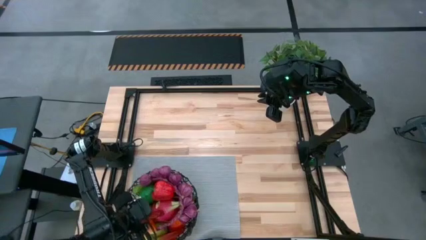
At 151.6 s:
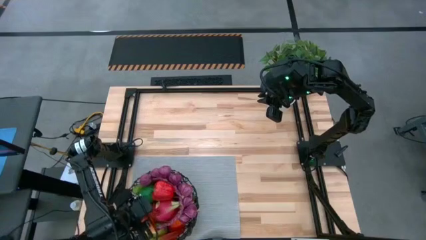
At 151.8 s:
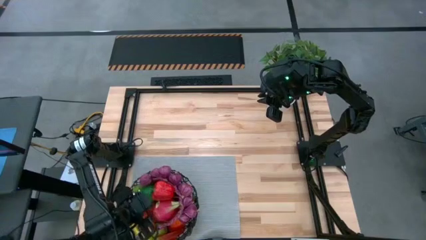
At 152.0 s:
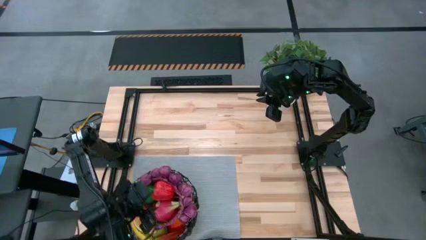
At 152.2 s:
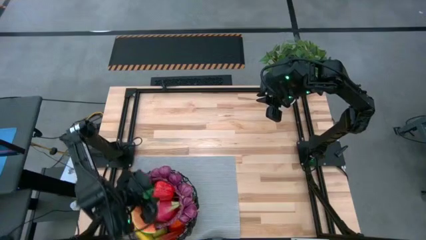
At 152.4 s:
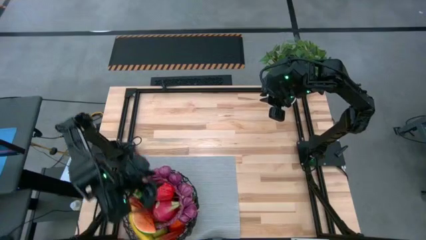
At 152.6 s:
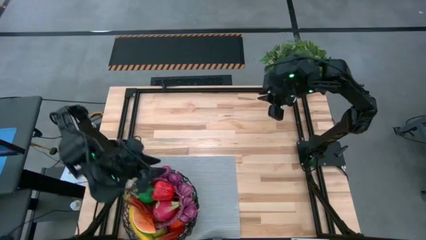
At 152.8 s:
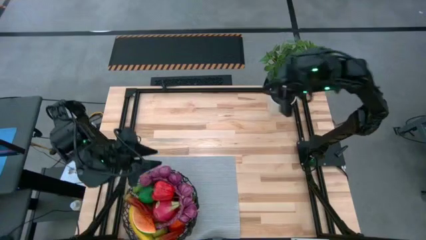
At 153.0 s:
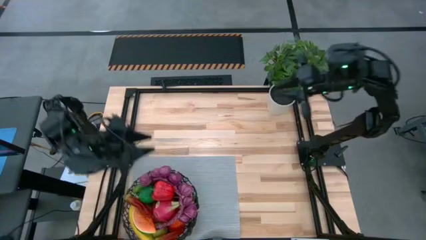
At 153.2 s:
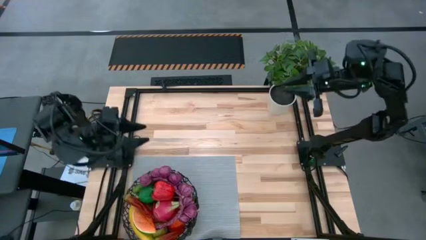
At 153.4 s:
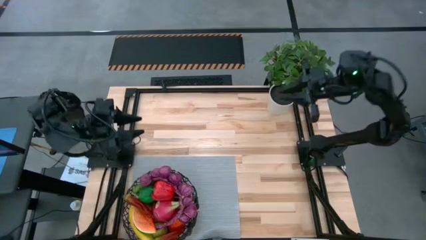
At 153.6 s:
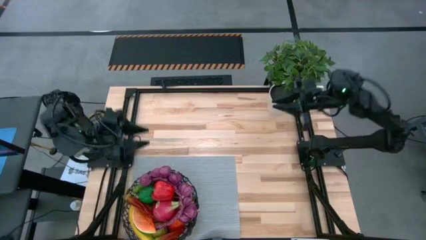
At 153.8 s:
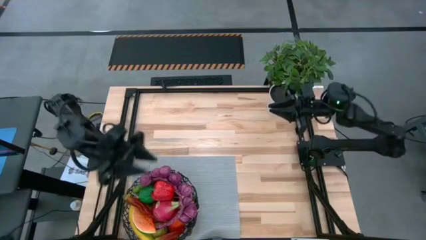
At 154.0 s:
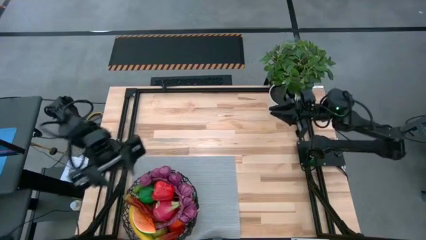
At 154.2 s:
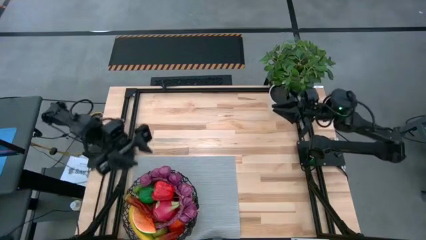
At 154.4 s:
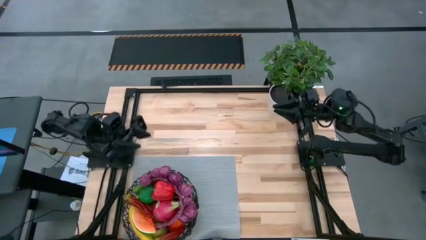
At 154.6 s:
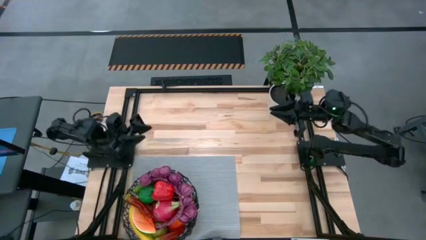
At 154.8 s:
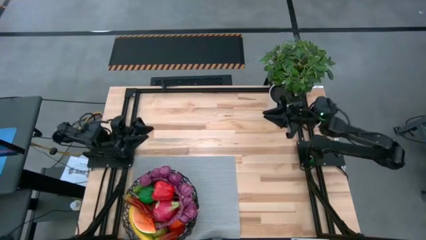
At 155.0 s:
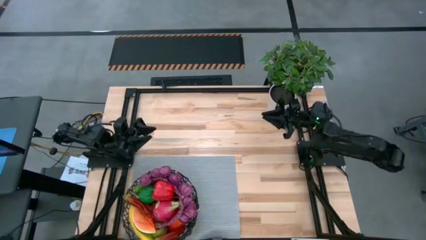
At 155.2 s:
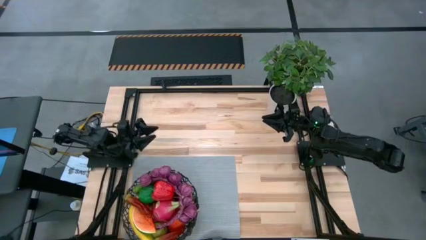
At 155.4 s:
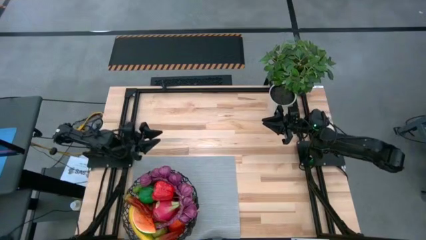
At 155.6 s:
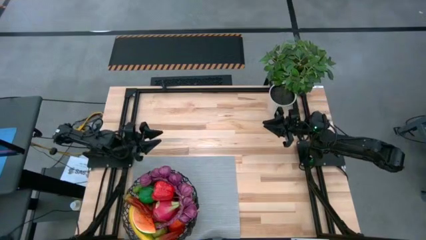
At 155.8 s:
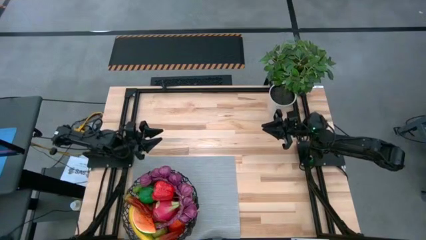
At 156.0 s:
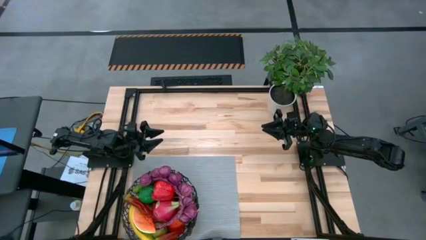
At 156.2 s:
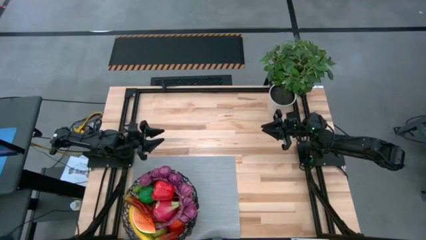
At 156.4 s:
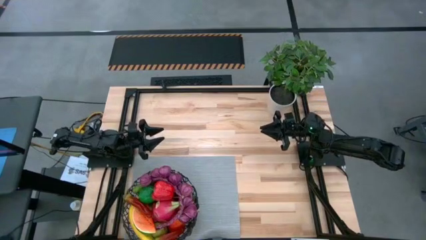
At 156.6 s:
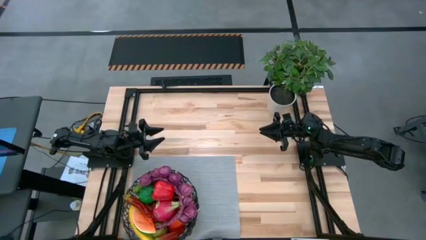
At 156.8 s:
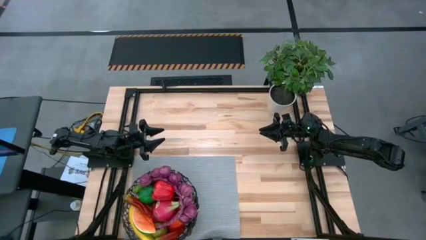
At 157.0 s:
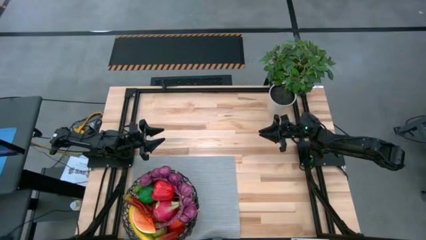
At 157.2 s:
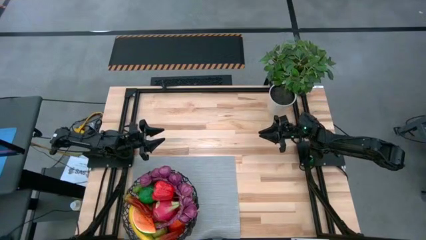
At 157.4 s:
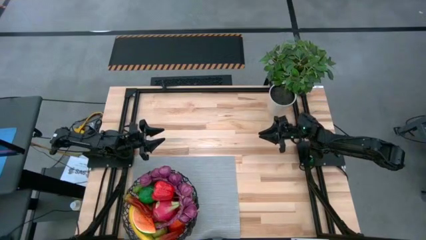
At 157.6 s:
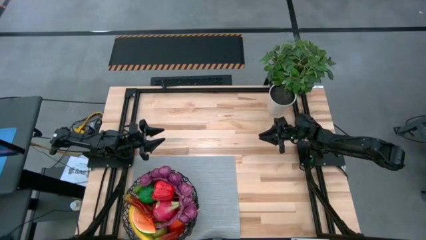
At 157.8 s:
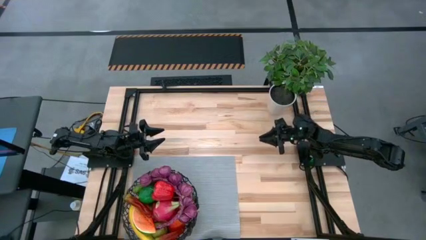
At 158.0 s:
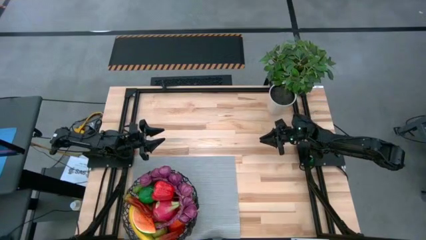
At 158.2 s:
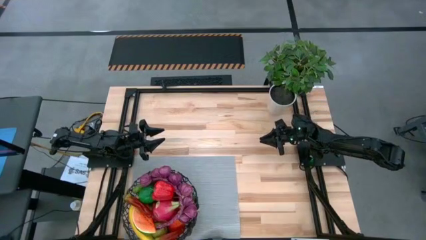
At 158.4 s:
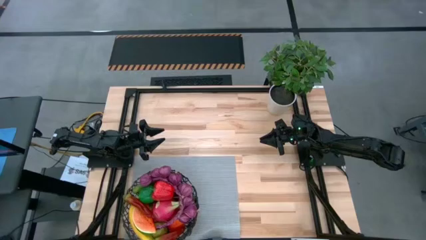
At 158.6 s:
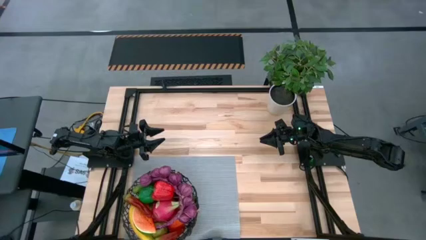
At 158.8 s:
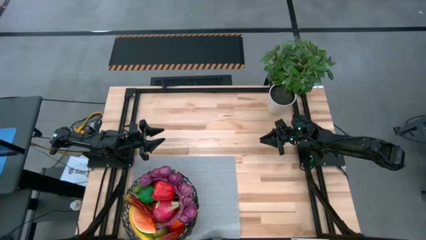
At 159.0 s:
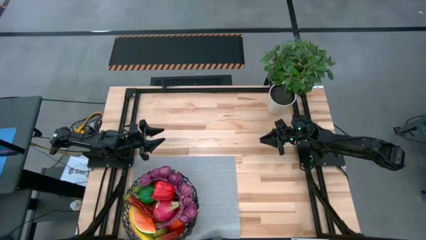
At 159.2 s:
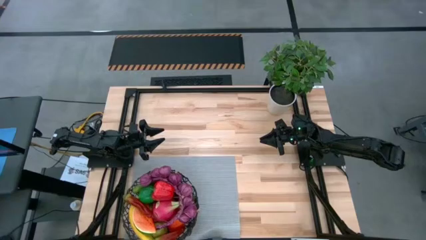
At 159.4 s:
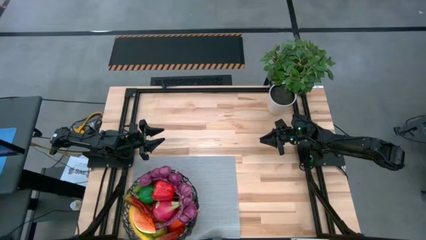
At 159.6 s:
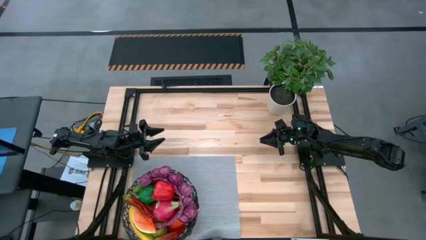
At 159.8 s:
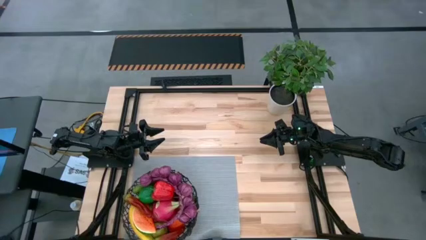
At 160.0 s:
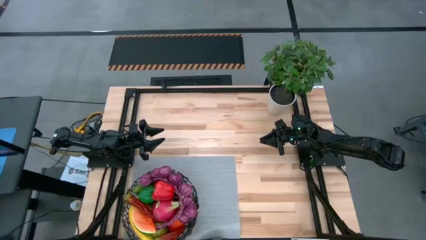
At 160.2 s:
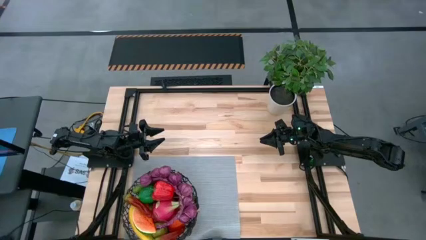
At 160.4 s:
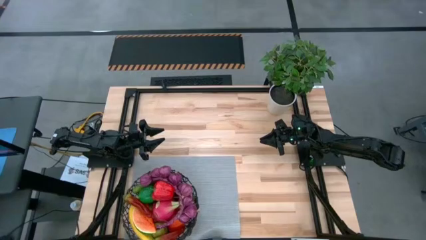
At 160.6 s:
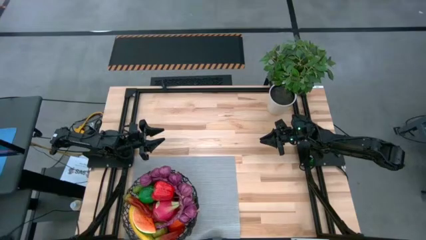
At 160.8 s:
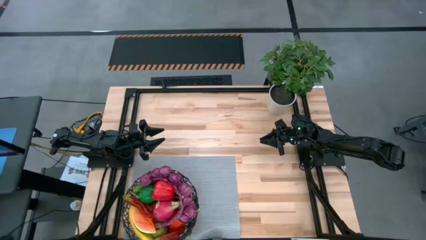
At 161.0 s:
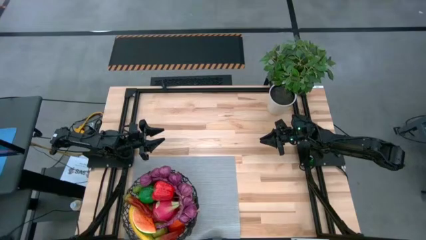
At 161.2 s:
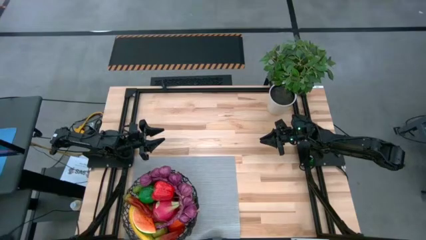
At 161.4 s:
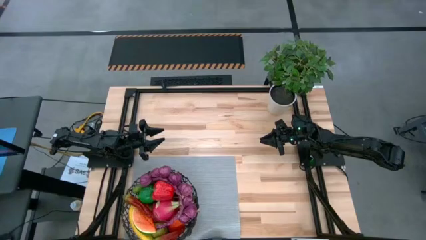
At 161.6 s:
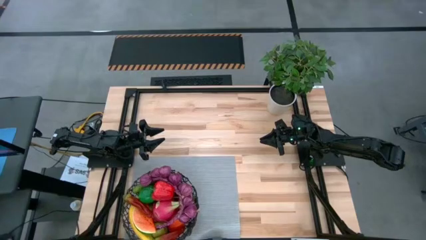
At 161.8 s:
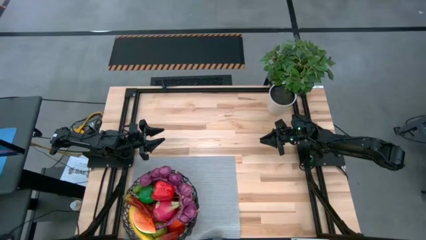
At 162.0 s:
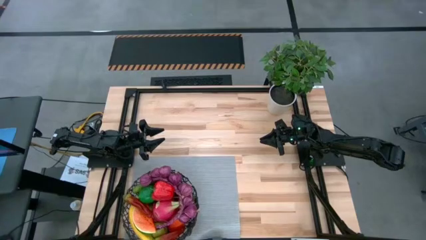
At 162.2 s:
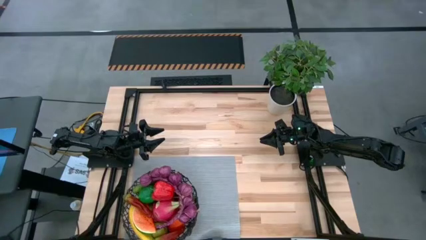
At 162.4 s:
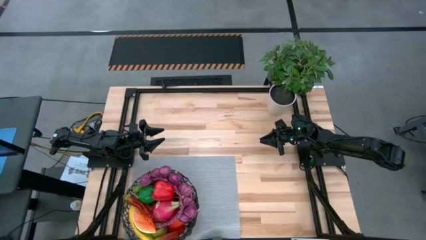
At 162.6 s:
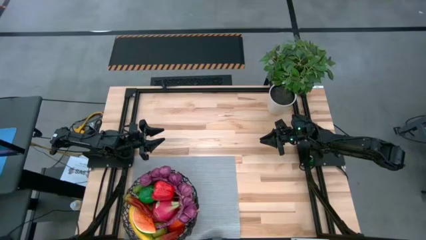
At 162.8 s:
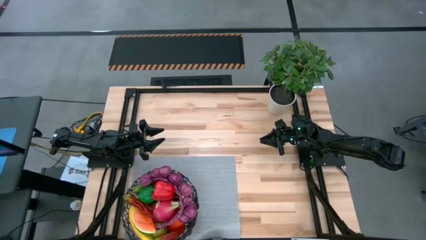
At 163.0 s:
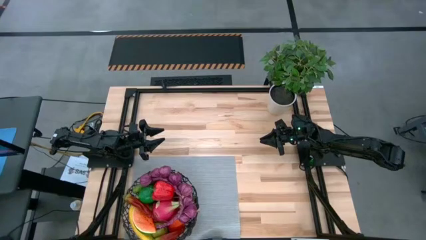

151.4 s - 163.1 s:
Task: Build produce basket
Return to Home Position

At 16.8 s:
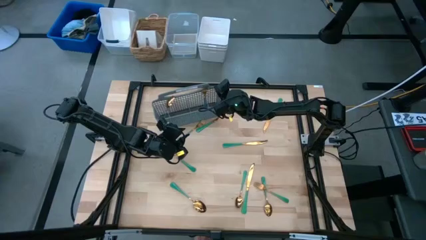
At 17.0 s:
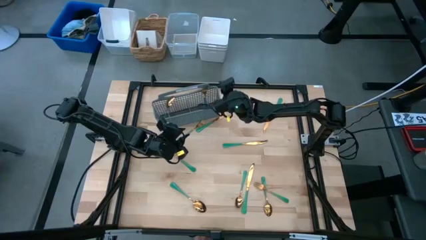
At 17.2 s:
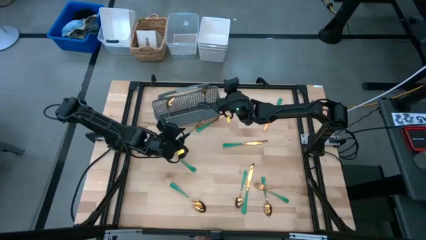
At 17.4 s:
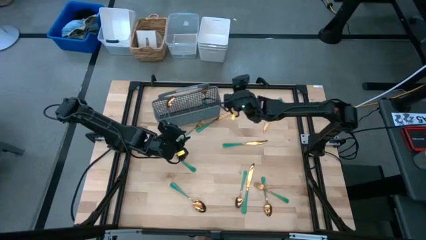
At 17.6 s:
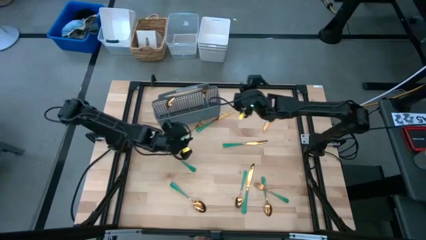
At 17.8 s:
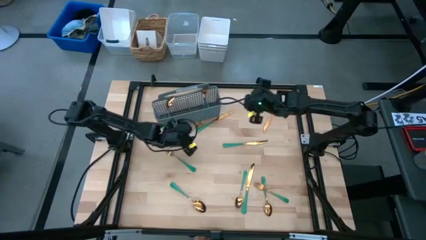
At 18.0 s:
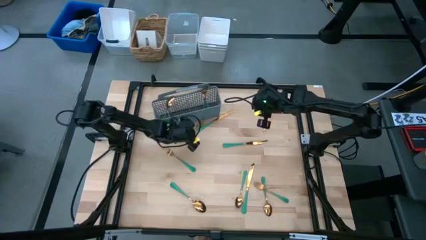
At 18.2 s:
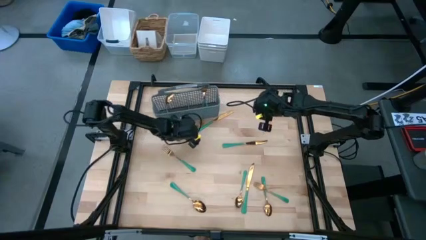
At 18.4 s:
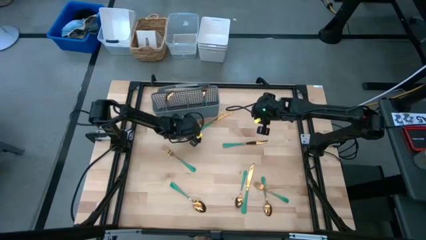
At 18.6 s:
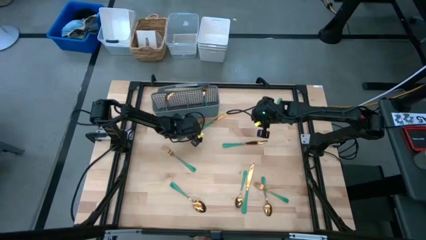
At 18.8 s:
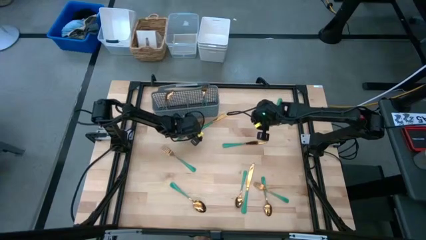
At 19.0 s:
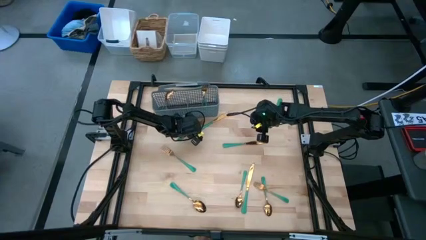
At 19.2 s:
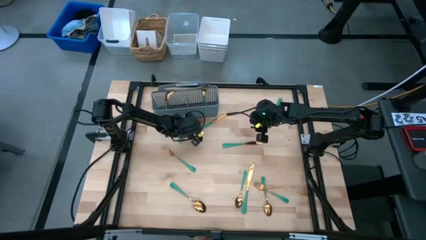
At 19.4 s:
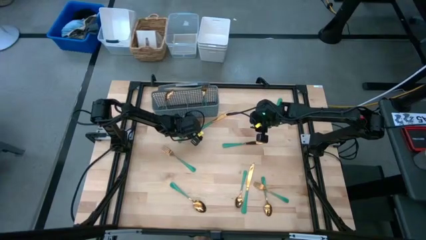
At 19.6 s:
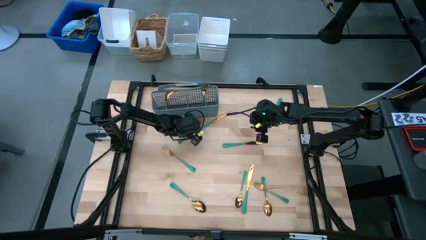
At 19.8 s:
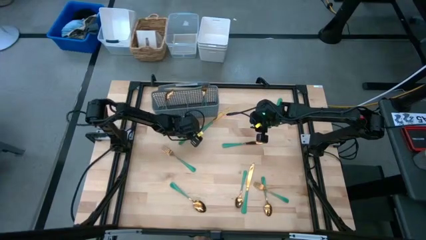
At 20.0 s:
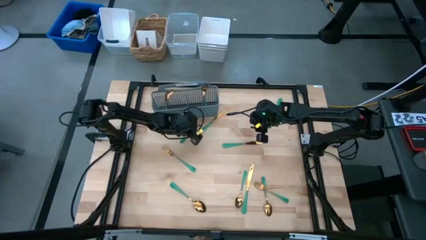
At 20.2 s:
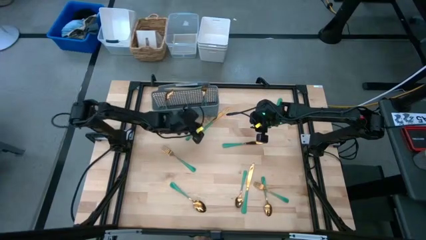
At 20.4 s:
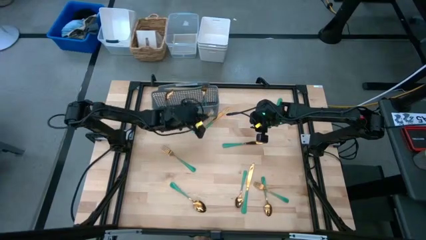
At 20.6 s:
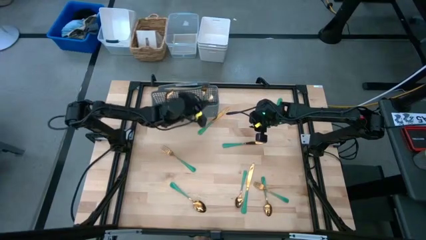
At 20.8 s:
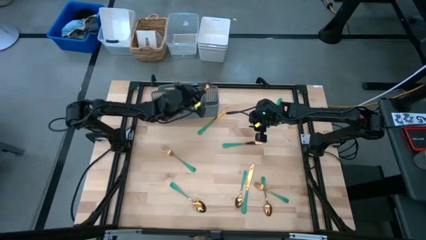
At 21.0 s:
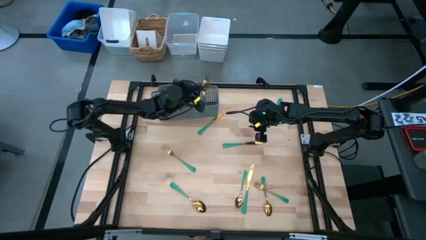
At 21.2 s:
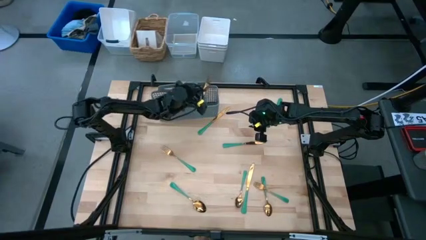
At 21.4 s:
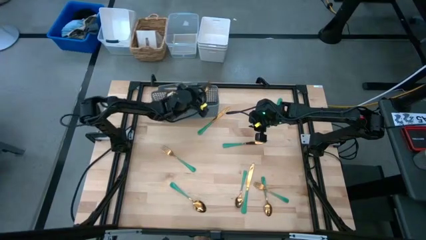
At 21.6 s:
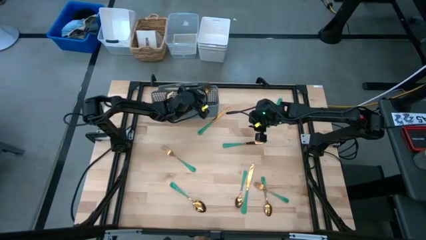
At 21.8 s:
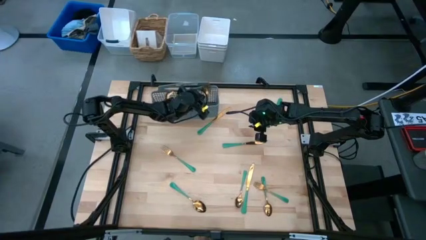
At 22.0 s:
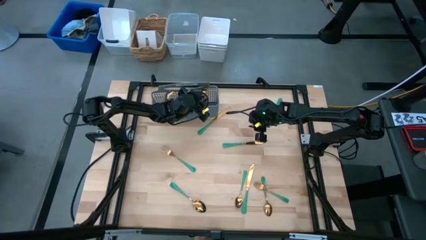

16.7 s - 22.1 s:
Task: Sort silverware
Put the fork into the middle right section of the silverware holder
